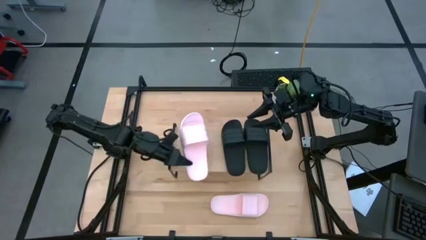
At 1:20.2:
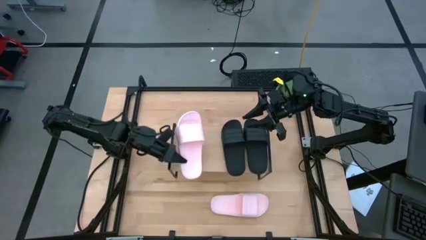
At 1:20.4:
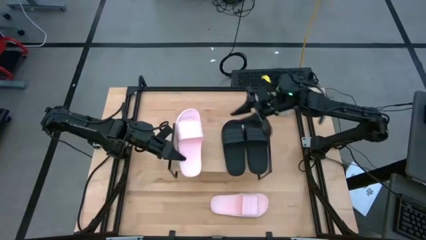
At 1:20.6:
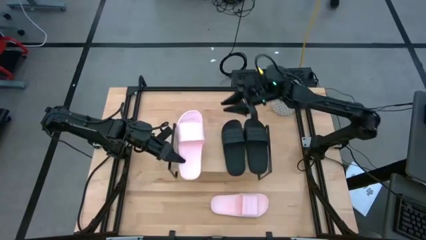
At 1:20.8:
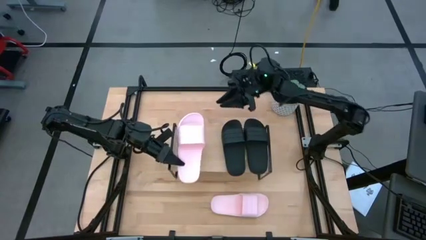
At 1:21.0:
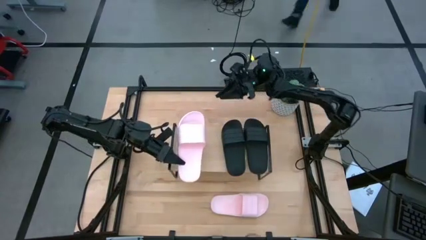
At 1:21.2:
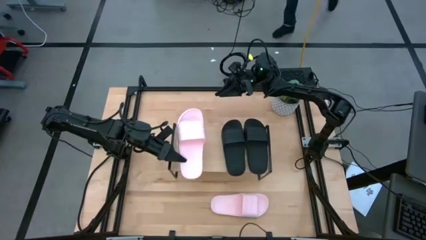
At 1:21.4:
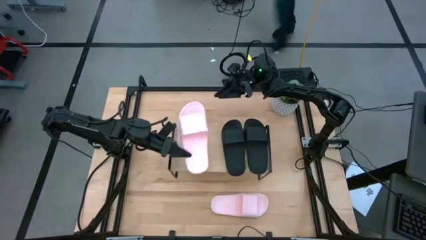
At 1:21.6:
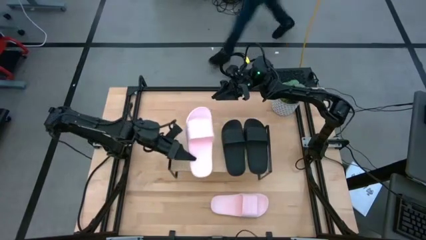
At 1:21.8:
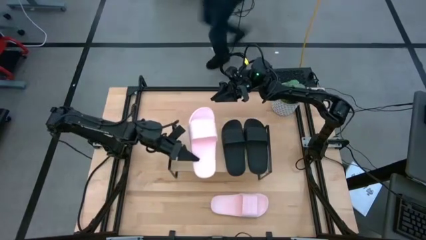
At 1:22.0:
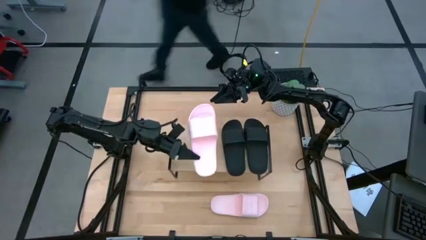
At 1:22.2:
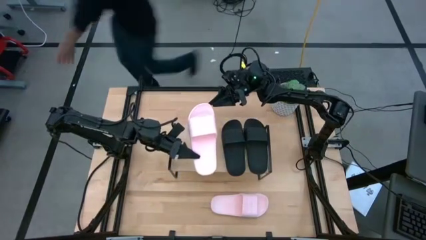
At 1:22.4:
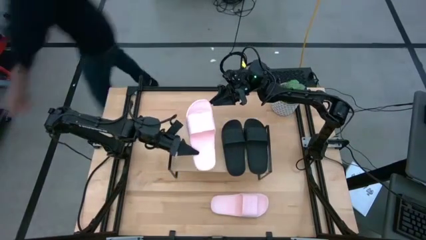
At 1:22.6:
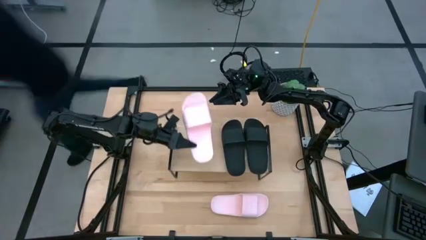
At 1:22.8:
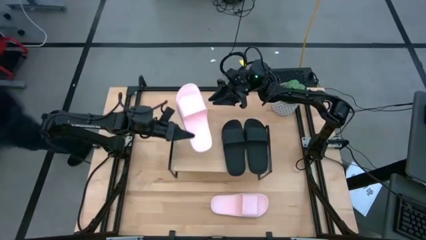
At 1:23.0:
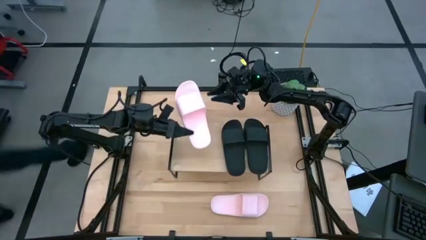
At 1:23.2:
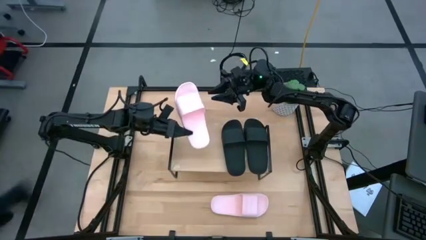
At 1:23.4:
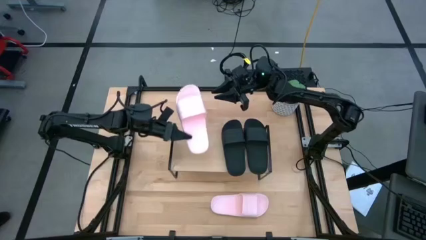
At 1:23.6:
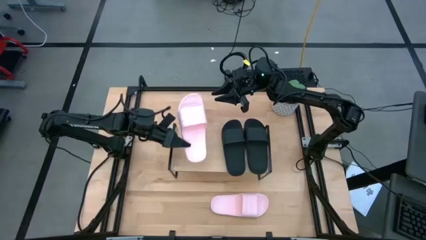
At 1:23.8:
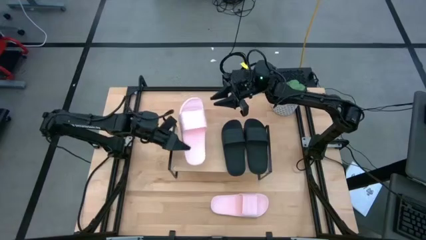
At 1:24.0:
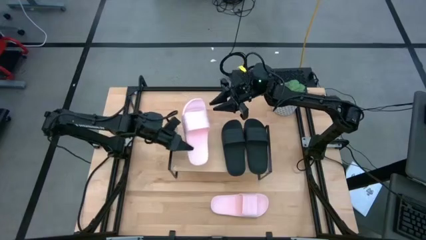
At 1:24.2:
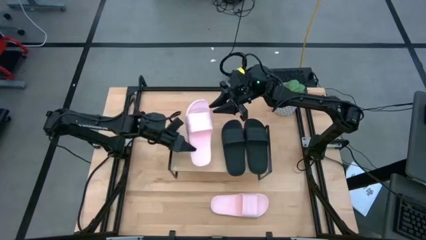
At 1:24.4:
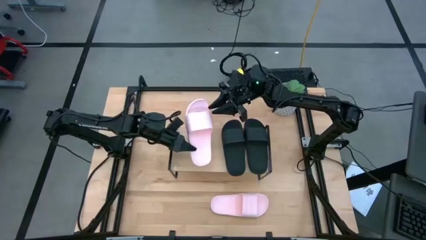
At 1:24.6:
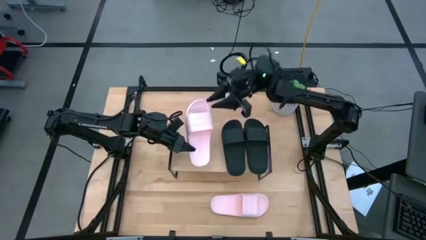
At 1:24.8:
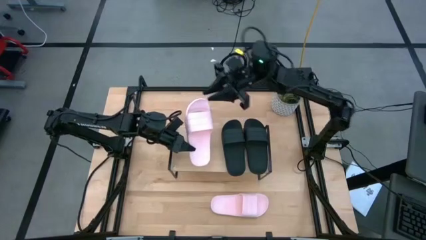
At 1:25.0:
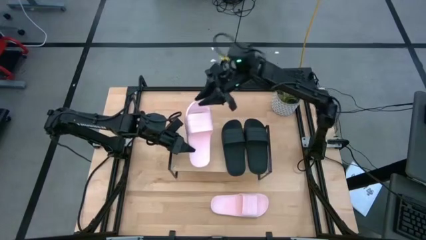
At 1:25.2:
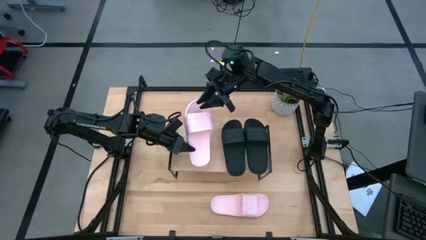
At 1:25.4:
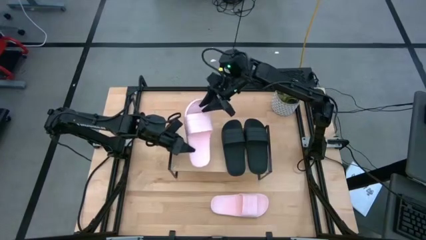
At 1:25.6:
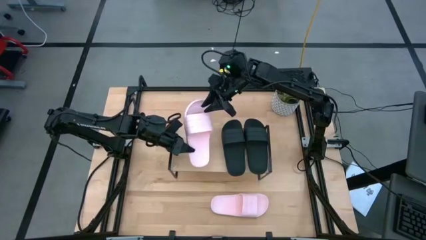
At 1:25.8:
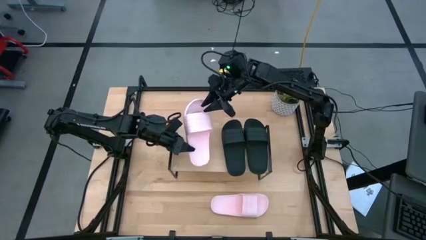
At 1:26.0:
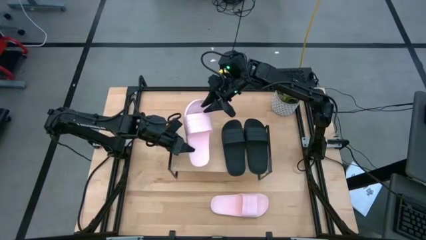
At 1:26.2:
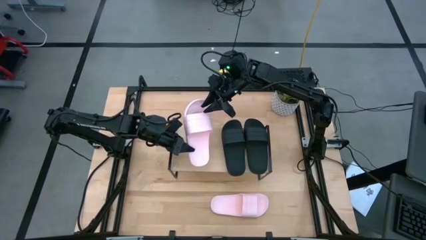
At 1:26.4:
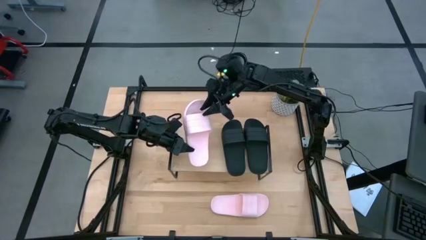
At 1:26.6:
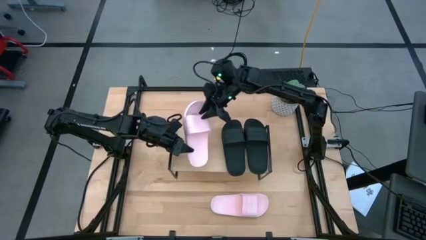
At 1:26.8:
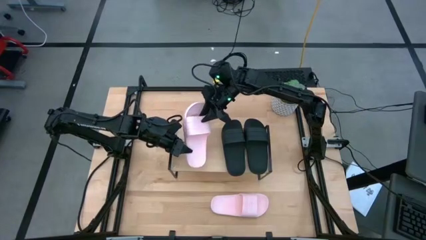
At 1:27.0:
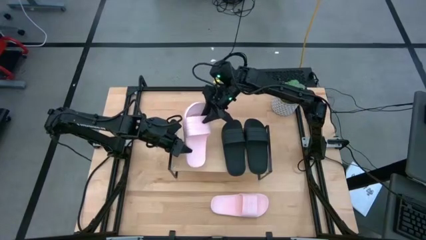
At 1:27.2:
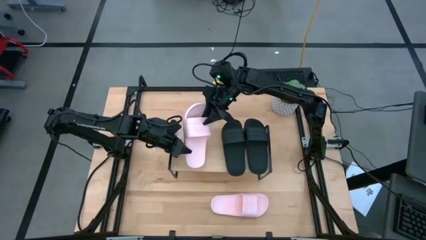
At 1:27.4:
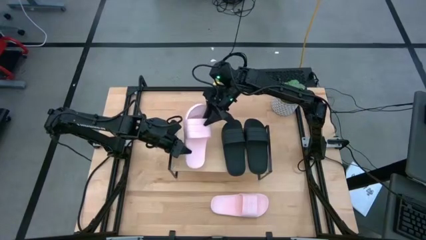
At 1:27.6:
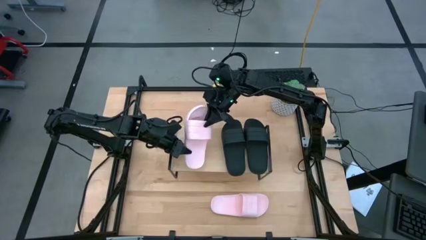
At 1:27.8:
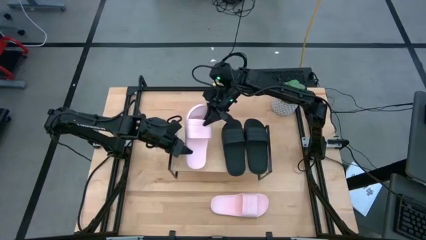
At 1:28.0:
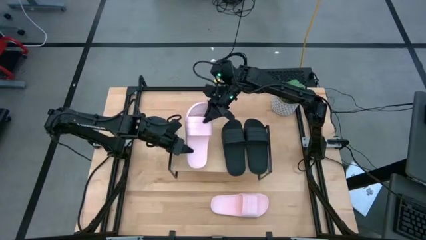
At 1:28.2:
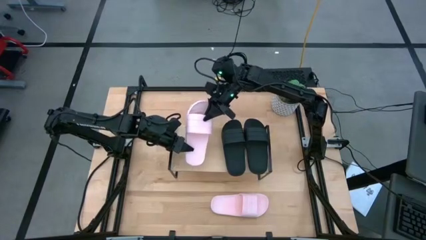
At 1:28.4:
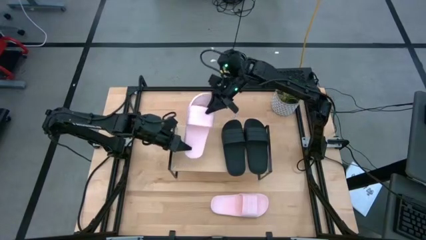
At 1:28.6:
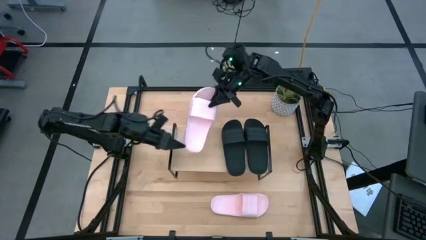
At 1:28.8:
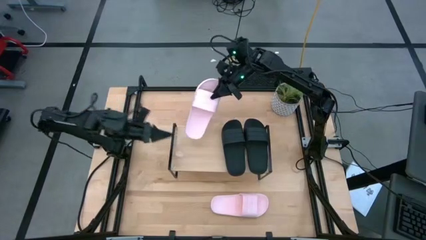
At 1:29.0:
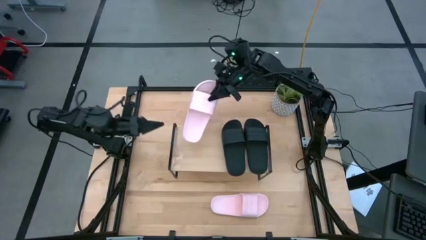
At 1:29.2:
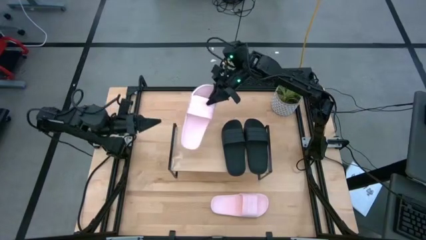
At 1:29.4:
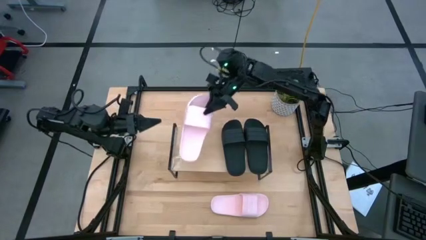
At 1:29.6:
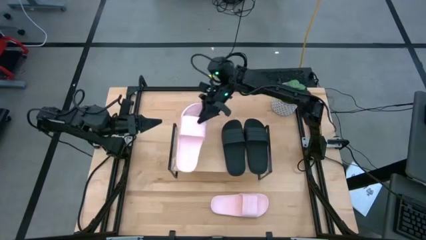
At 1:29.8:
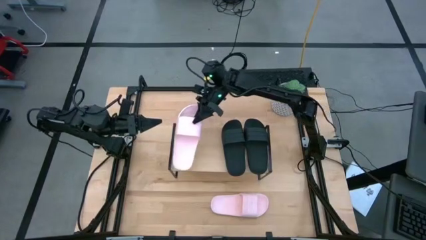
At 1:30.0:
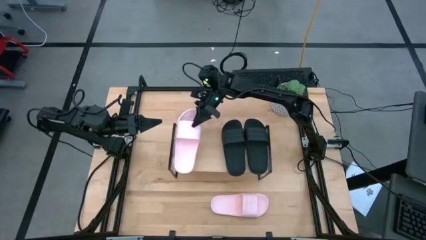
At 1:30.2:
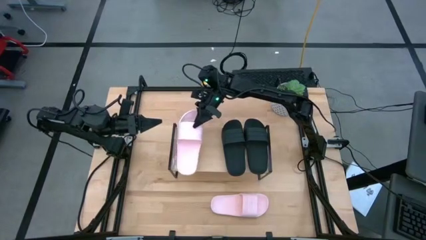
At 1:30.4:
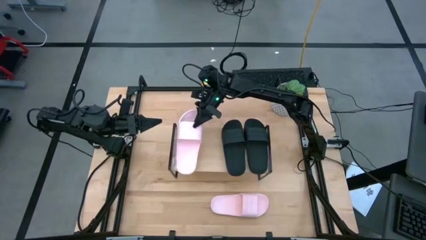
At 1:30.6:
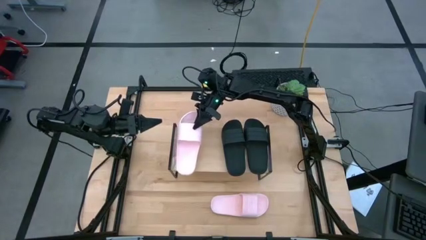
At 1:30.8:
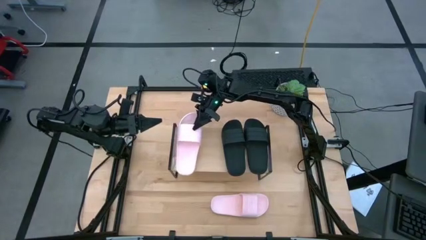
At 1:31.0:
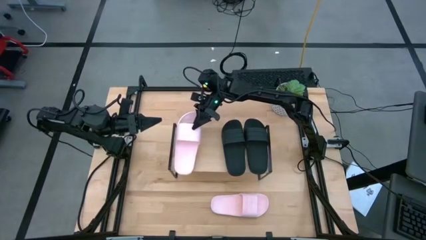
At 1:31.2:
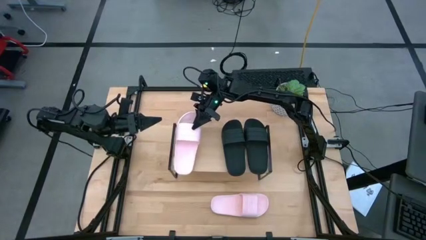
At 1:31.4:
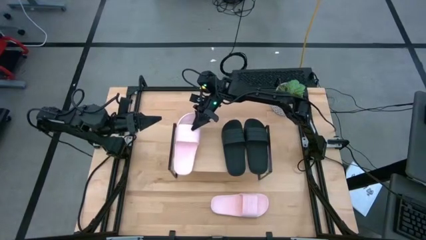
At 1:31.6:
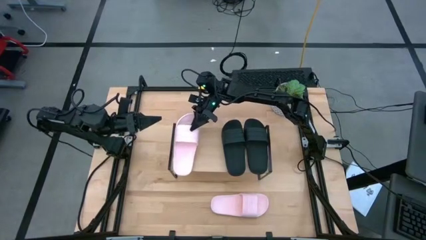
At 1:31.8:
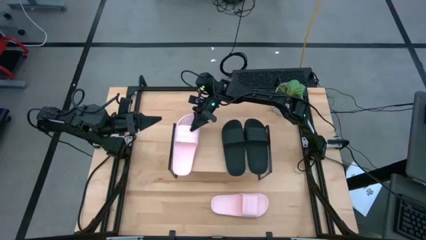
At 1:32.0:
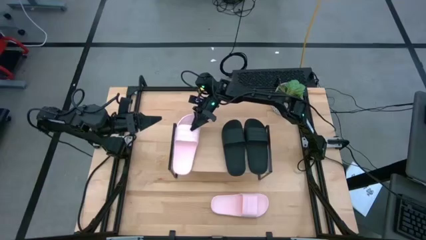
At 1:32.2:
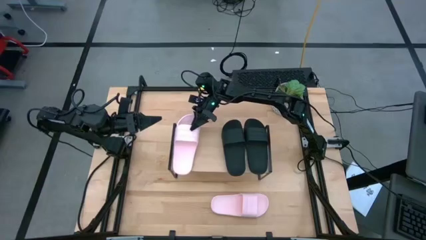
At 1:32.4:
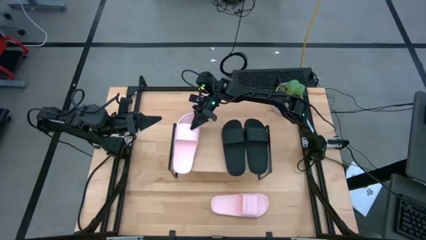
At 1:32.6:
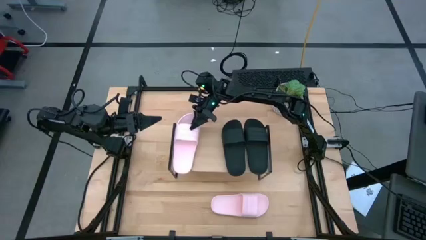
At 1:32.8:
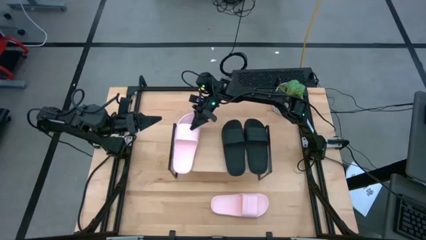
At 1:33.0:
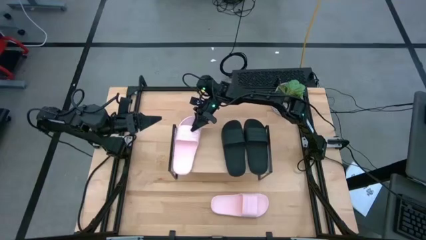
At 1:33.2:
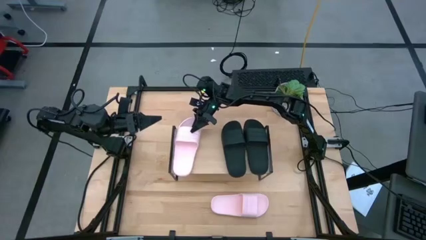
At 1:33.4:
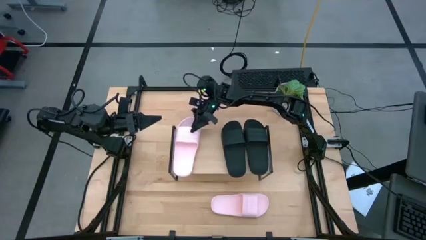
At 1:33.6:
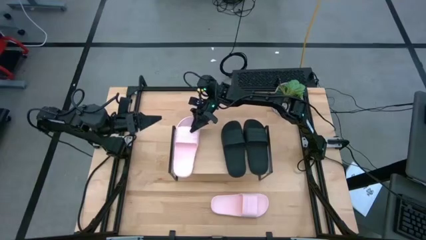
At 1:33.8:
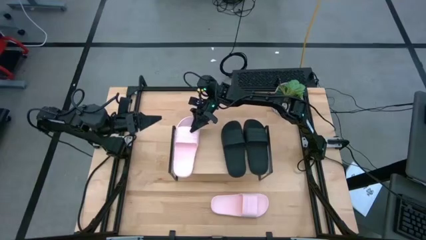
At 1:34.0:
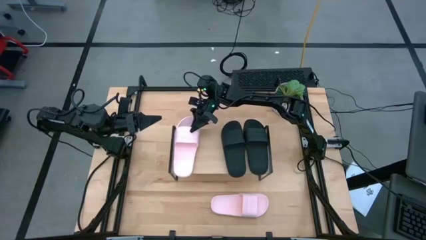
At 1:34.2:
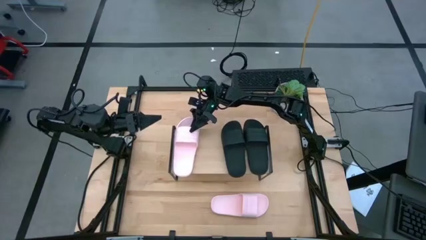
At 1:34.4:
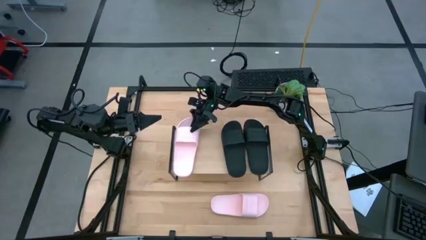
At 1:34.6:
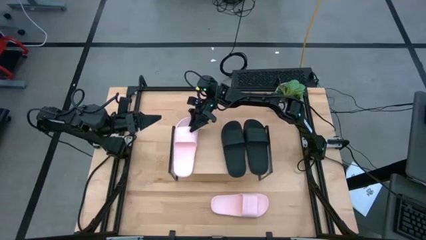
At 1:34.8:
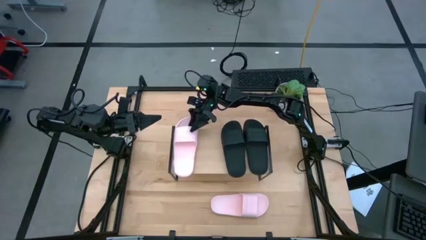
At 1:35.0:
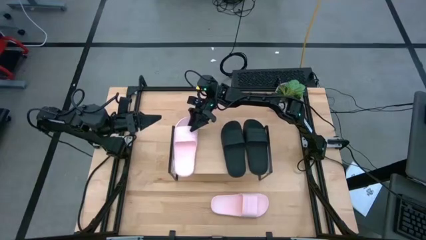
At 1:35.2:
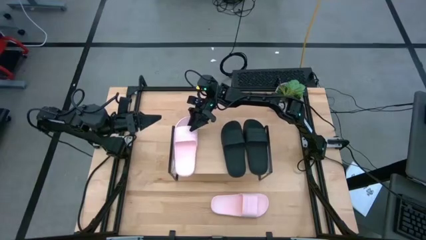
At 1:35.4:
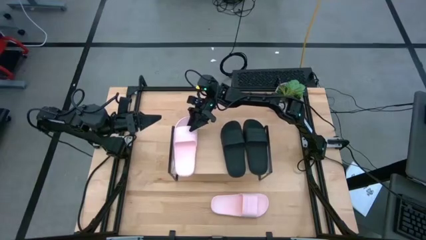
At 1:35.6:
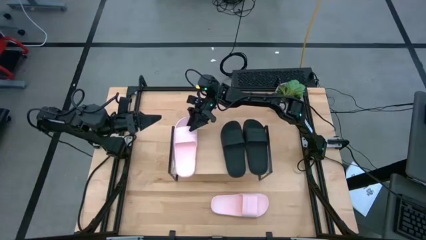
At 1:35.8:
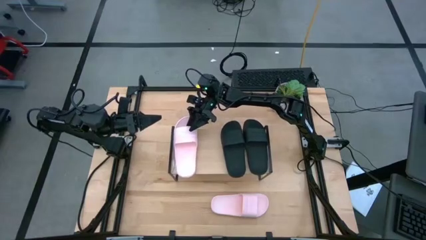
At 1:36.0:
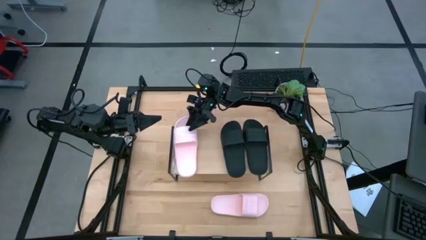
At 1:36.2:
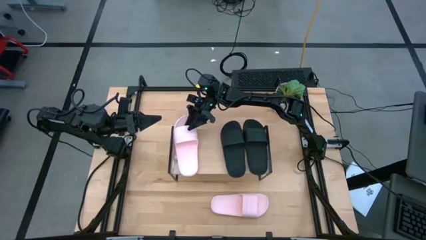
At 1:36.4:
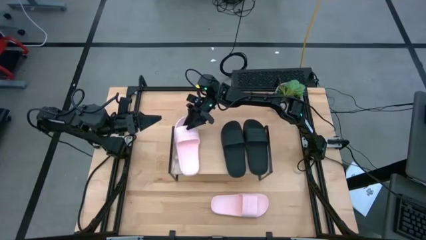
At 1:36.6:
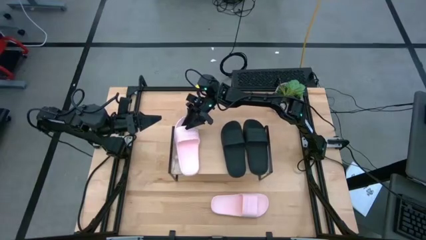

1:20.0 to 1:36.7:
Task: Pick and place slides into the shelf
Put the right pink slipper on the shelf
